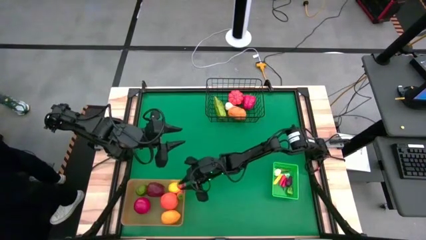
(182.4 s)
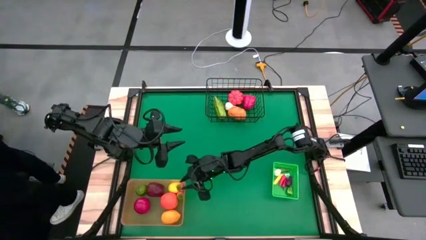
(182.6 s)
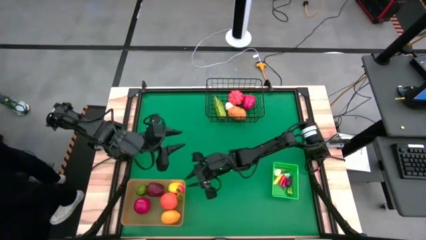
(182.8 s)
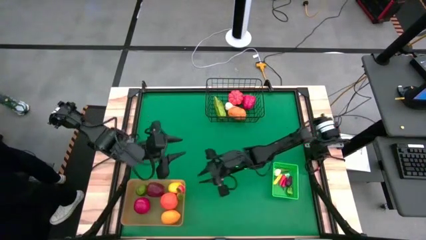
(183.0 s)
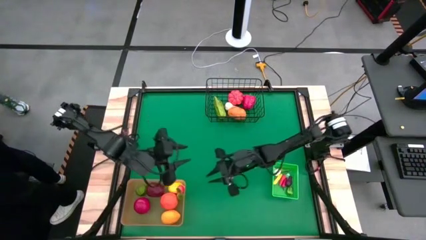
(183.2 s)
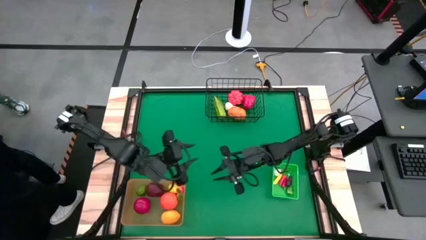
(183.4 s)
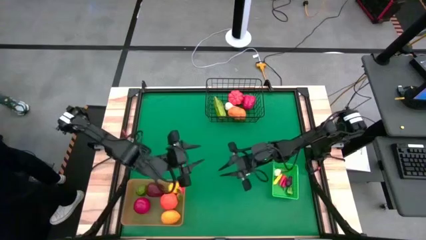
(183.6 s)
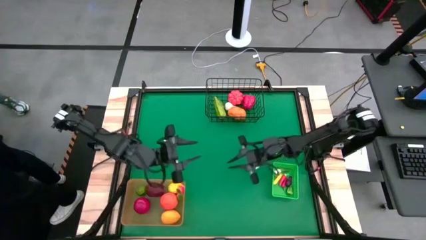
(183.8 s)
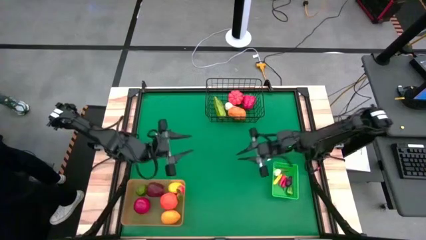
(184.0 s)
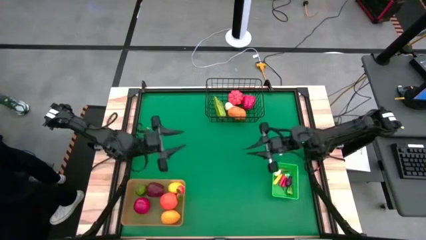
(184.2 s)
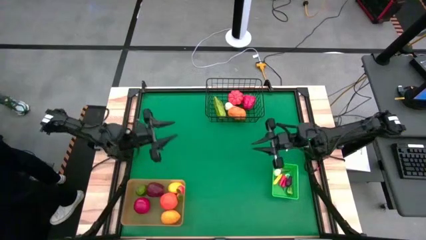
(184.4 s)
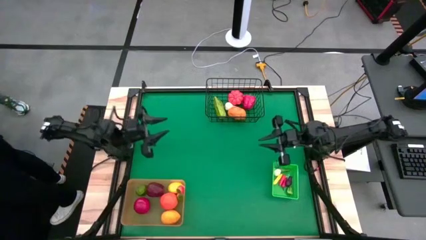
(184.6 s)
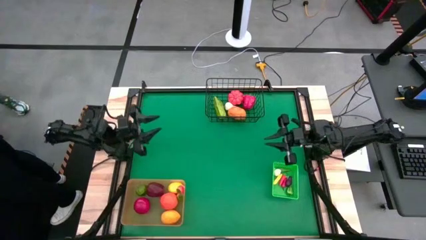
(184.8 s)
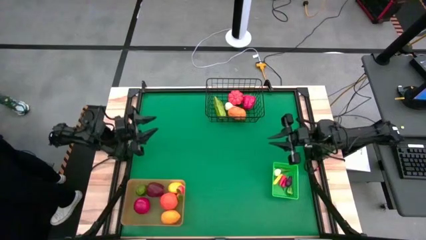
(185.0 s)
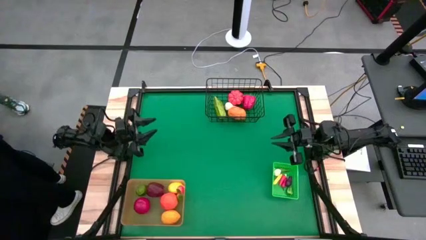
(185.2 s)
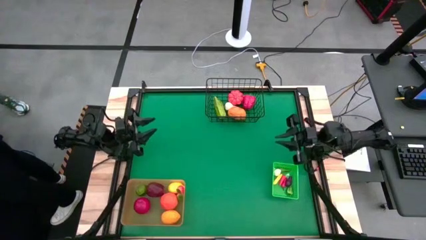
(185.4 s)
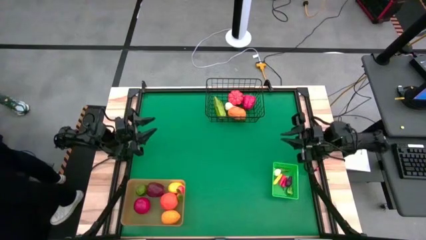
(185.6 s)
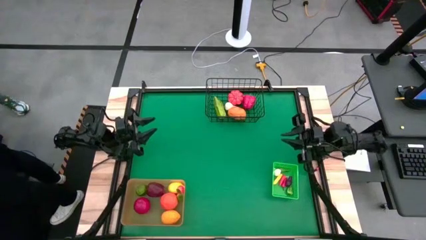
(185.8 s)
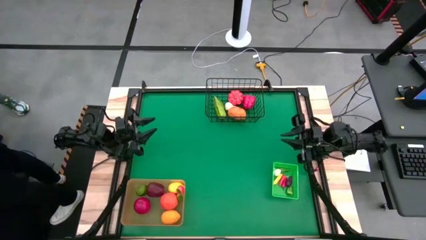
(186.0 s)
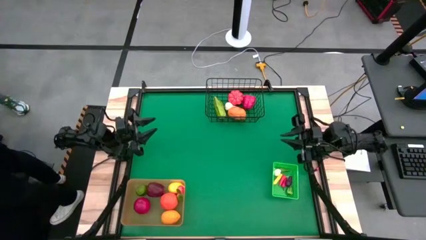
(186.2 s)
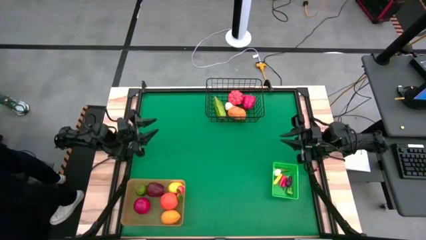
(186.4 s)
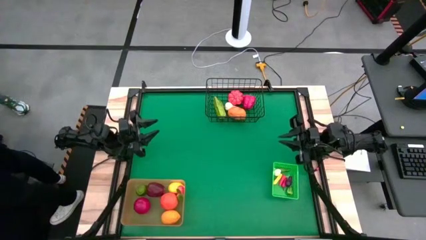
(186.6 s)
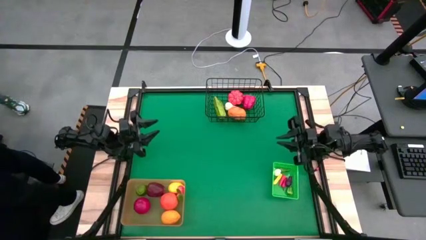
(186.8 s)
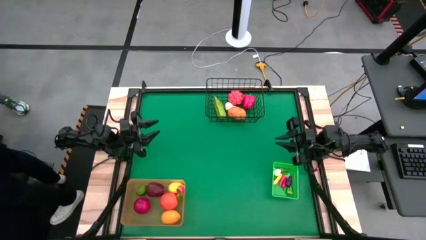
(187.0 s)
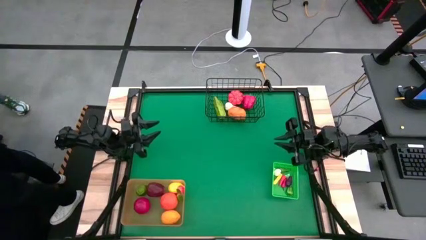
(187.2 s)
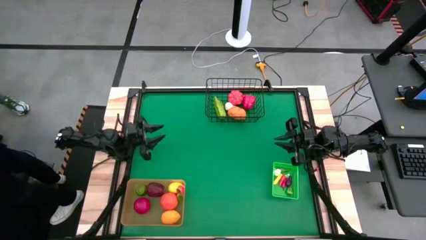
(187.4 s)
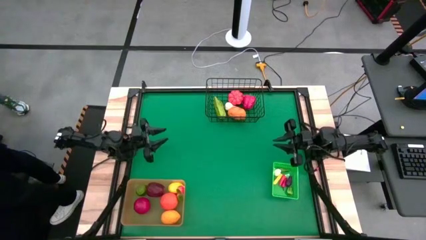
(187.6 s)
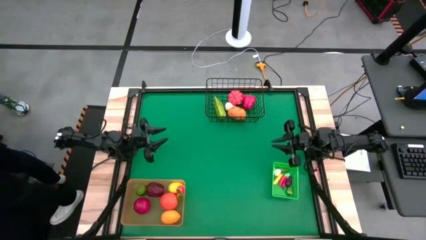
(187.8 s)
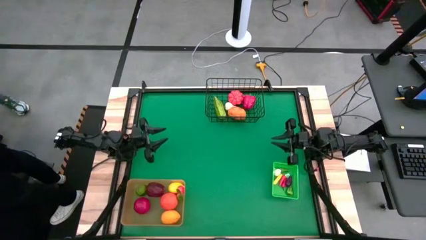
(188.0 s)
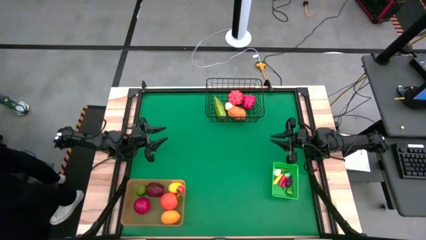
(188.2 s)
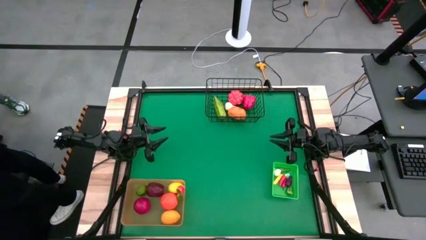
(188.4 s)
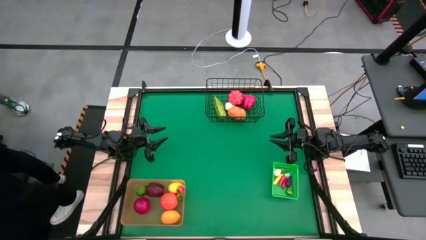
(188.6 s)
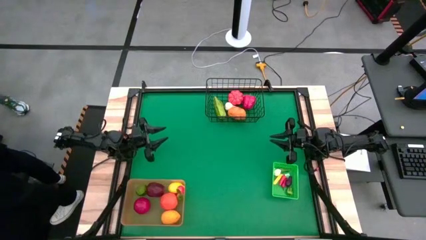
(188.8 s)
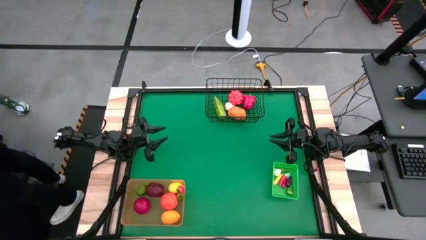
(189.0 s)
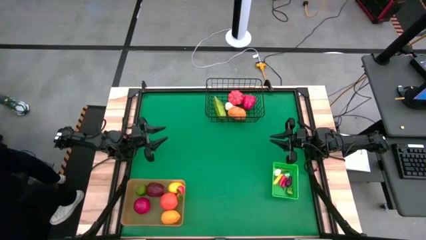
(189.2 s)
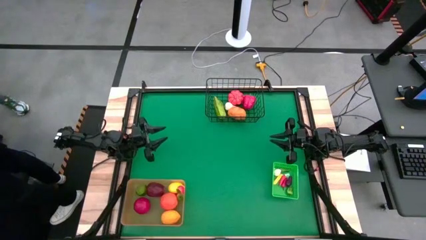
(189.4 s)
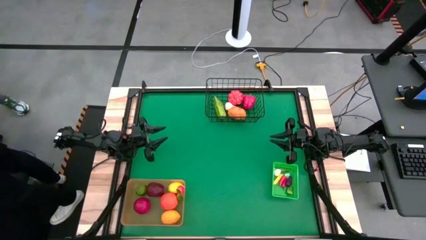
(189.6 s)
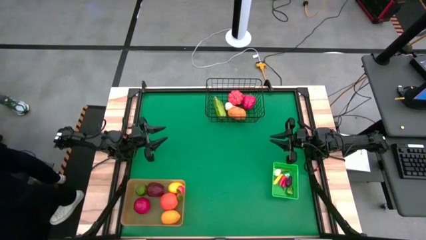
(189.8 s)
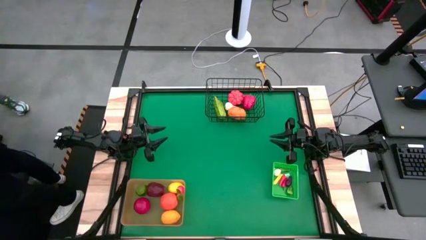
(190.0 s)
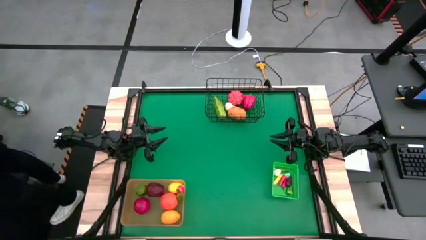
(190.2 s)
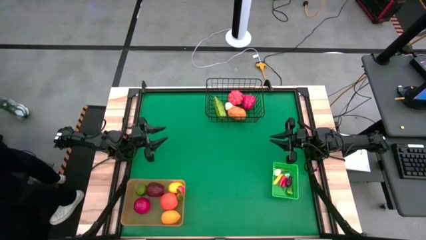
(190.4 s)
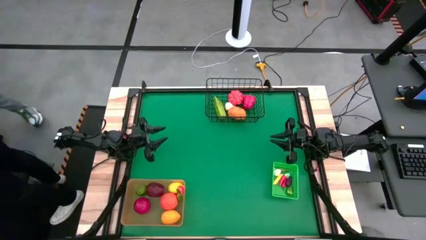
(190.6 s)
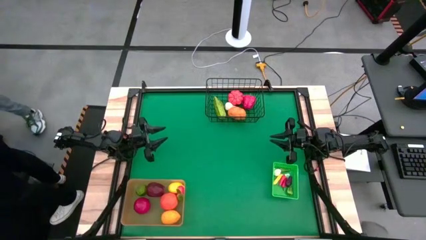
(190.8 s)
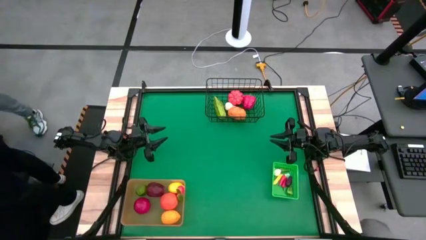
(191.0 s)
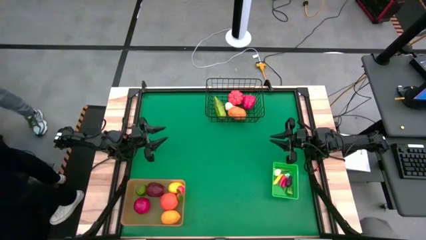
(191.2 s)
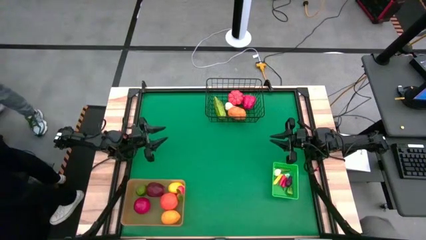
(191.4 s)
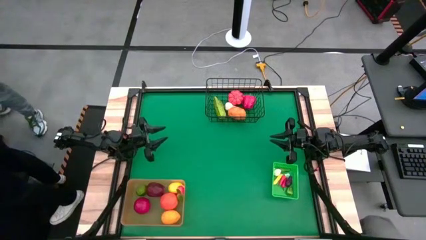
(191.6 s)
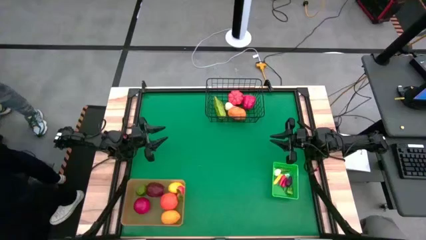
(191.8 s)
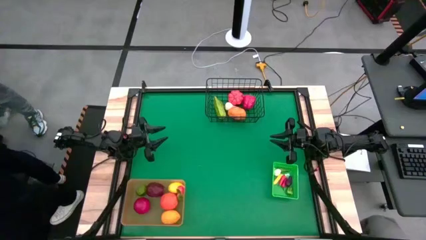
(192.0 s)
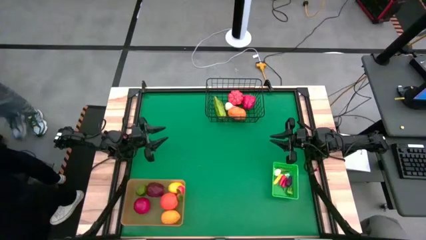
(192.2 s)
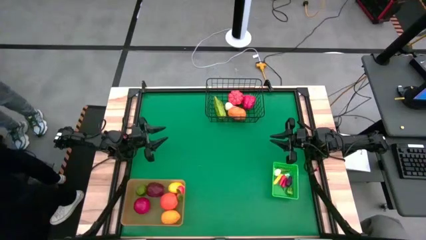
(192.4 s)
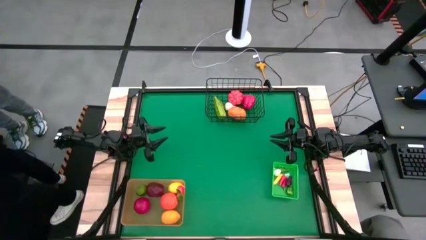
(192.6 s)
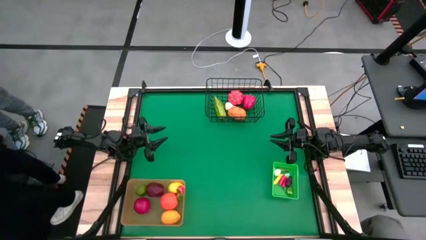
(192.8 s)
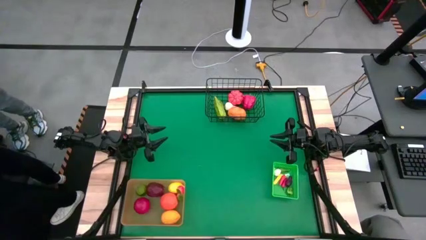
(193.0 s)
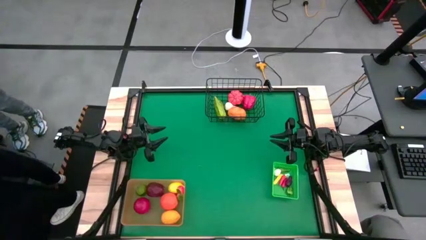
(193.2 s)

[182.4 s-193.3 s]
Task: Sort produce into baskets
Return to Home Position

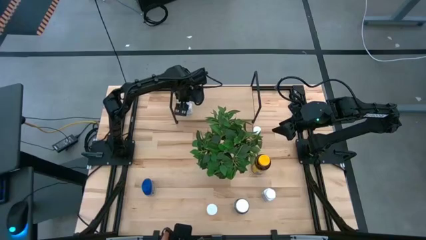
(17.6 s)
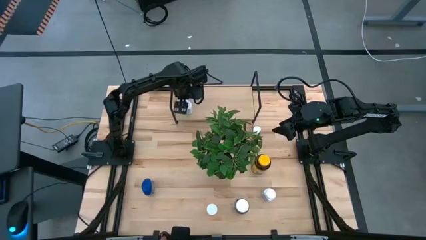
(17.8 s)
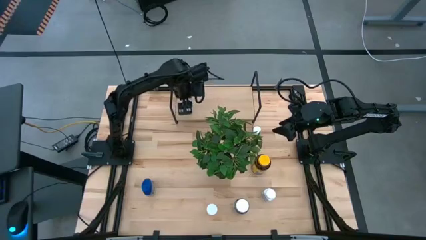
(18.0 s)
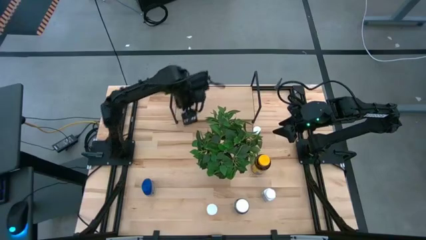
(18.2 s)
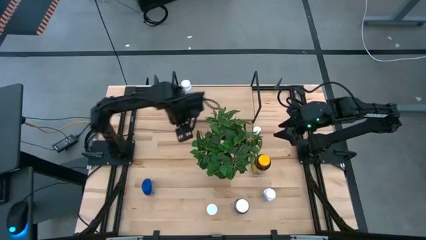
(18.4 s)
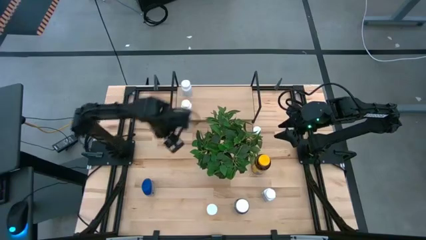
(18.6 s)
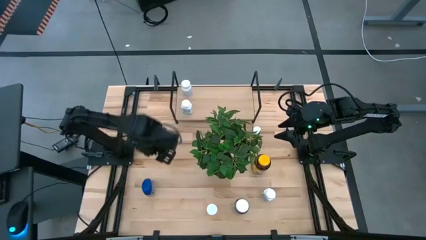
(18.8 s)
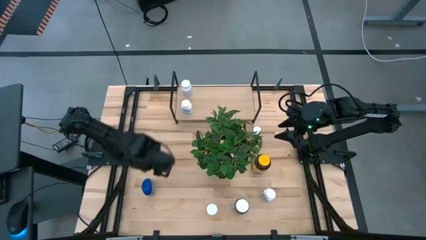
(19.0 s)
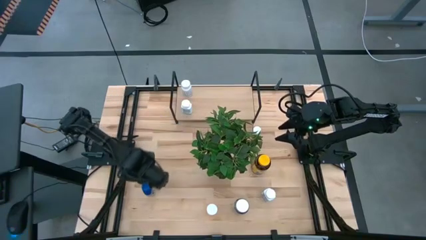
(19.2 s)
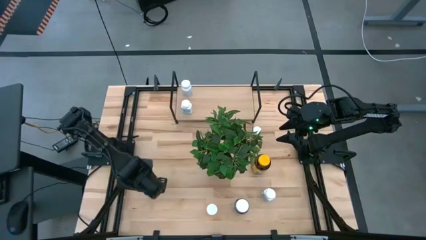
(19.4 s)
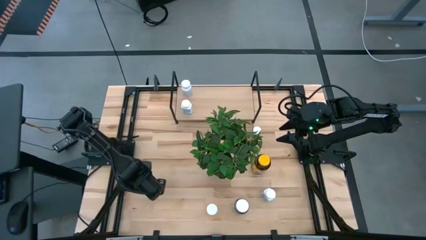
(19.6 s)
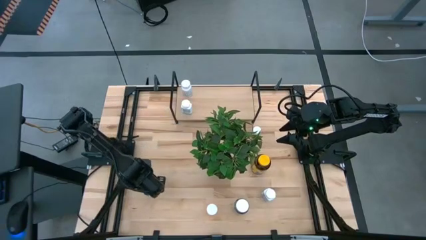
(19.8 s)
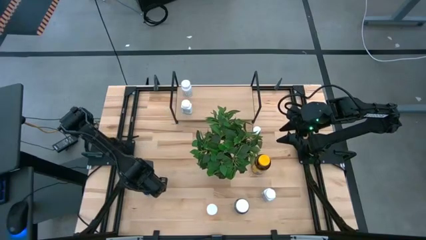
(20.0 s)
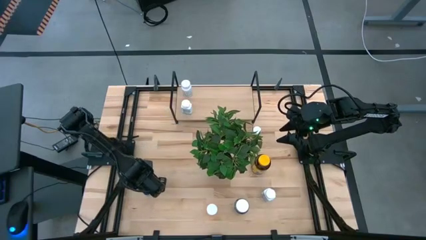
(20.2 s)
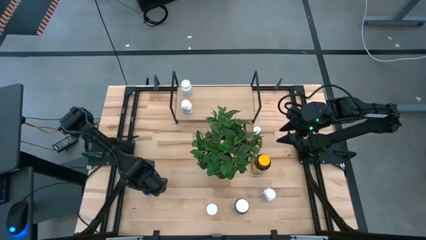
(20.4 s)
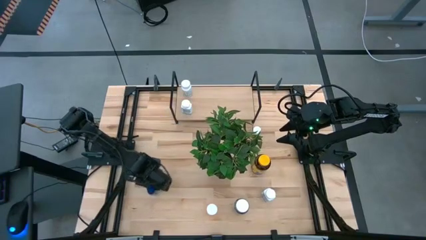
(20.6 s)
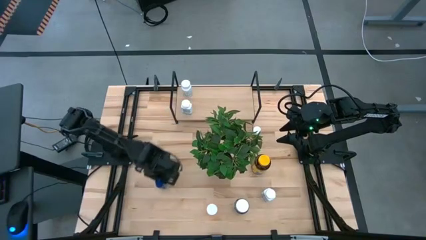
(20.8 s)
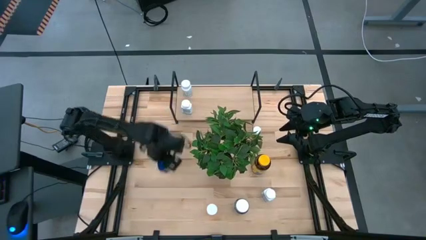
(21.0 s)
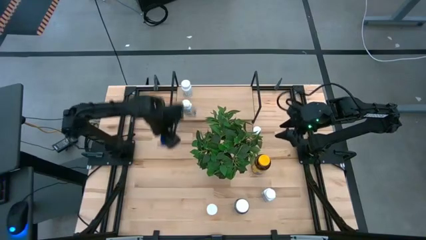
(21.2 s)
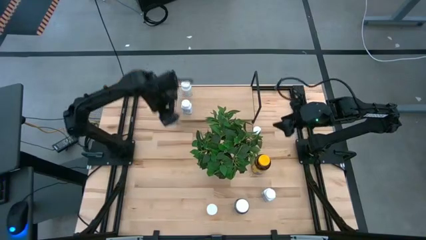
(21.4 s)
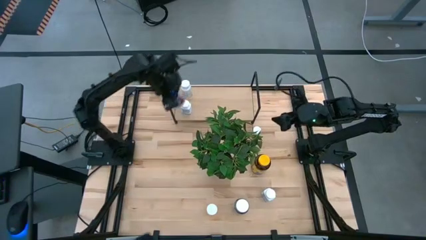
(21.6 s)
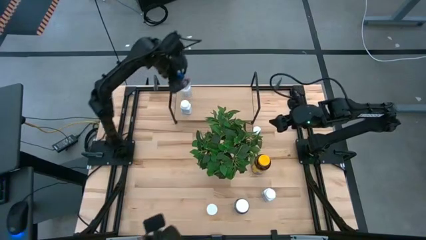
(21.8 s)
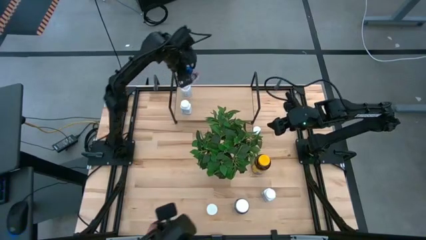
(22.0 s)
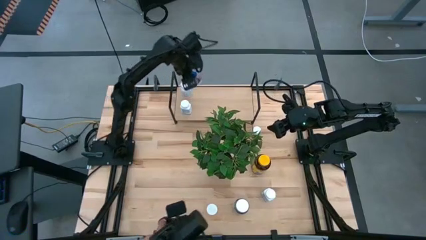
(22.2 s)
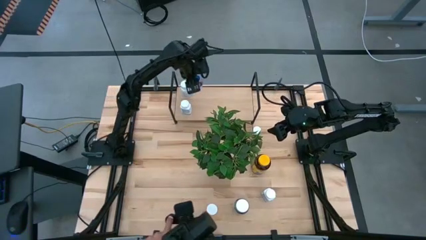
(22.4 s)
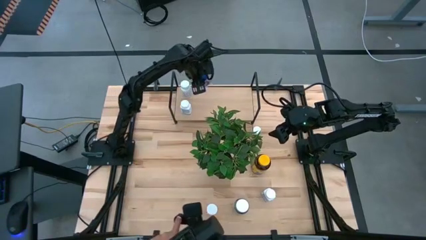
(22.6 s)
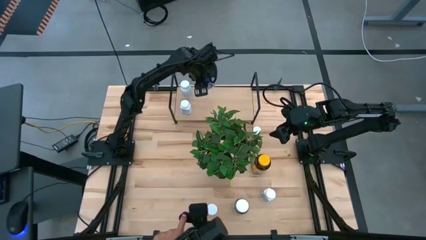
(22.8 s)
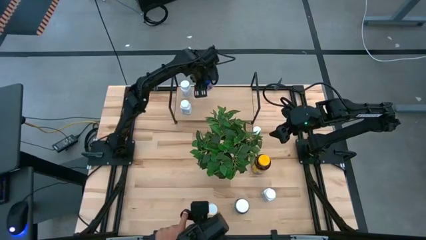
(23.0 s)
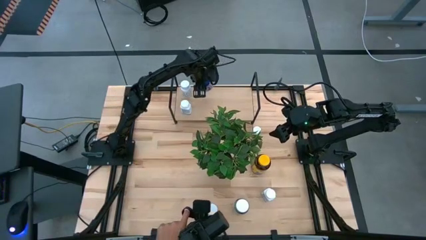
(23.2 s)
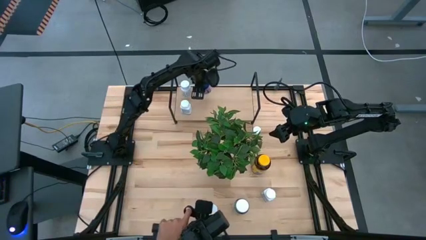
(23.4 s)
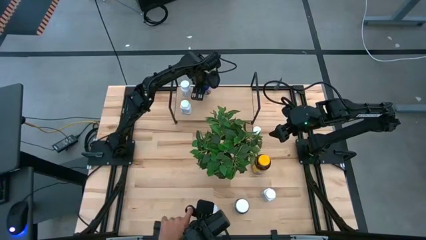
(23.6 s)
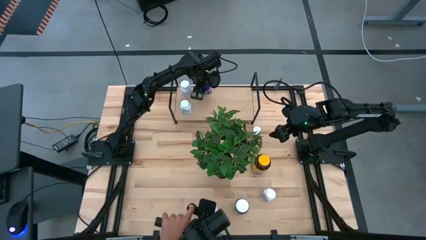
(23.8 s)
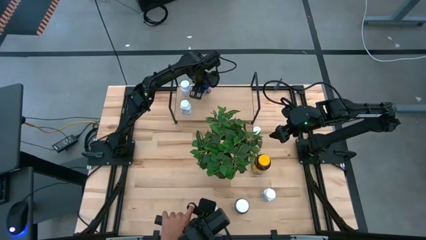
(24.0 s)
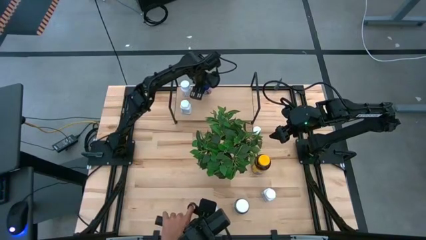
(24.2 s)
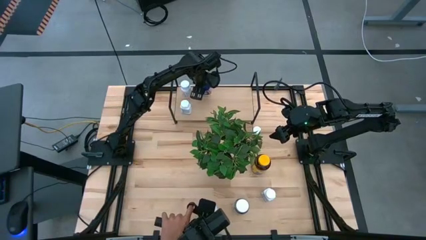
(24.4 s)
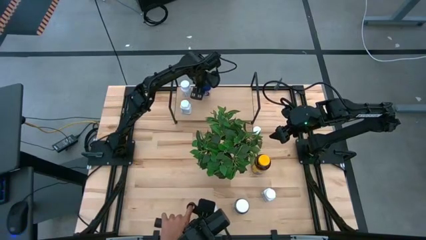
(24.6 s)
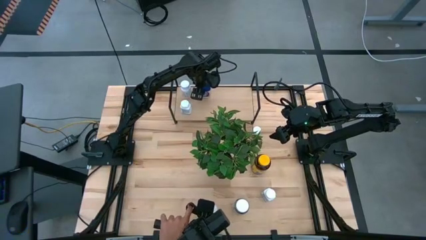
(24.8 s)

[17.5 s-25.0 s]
Task: Pick and place medicine bottles onto shelf by color
Put the blue pill bottle on the shelf
